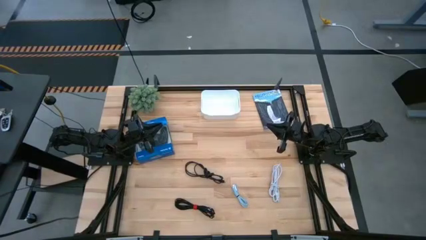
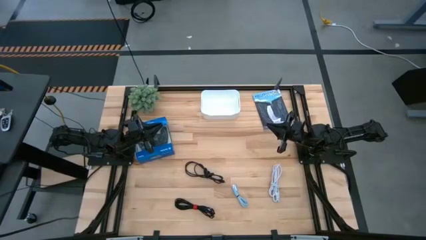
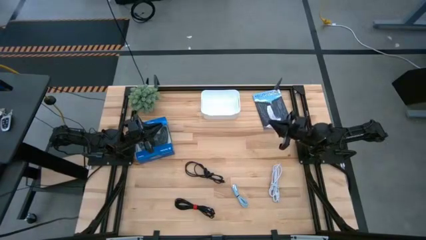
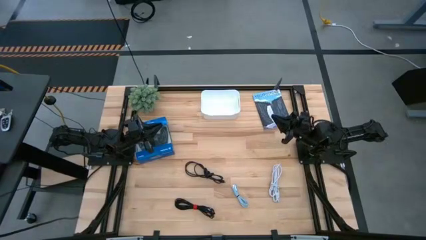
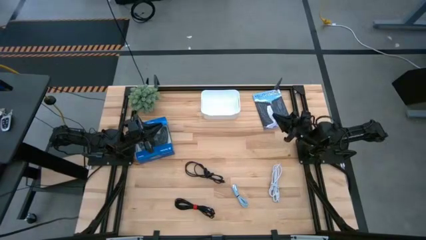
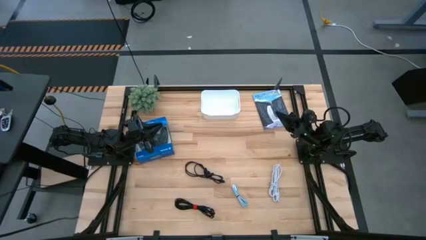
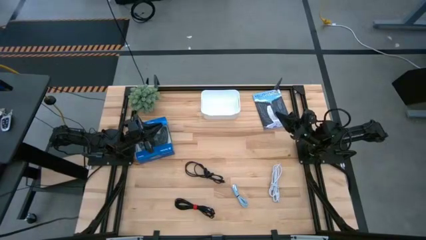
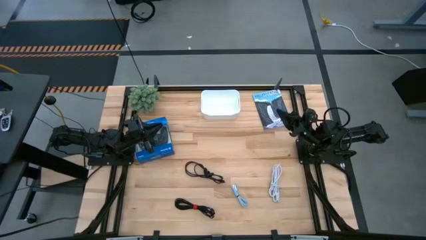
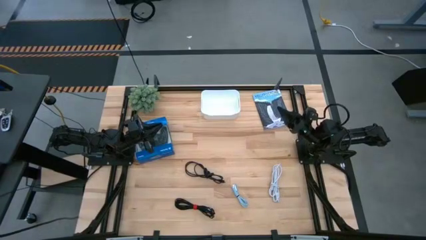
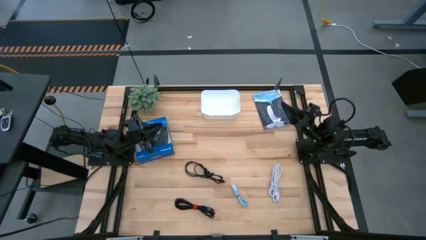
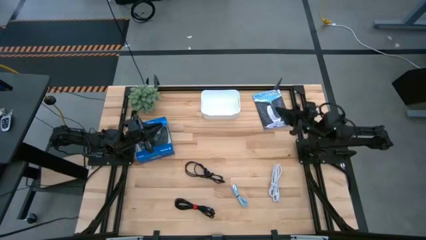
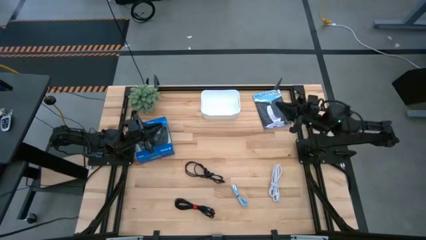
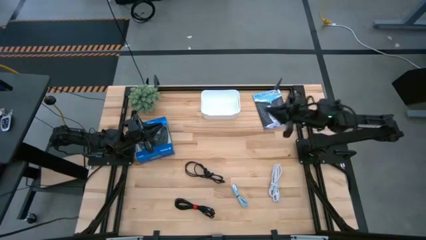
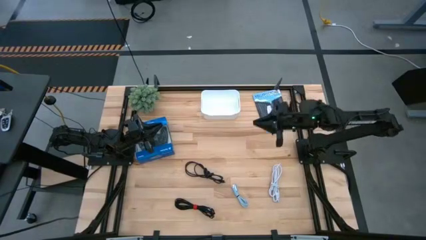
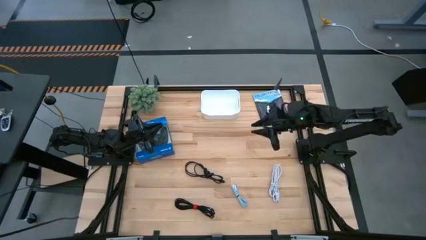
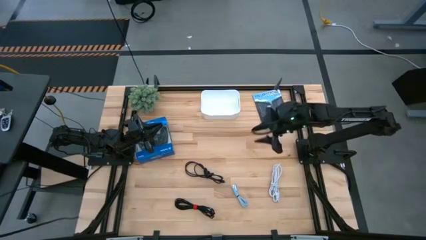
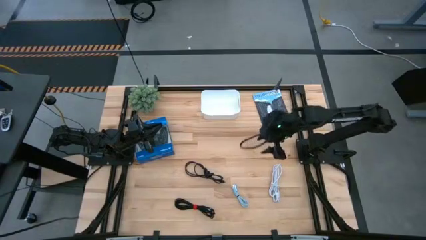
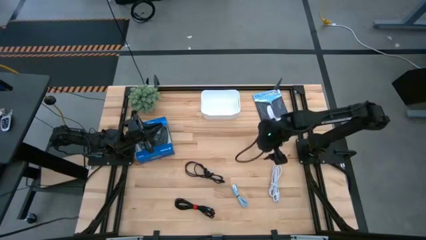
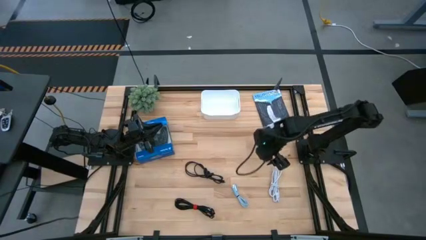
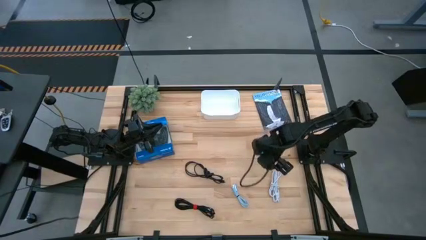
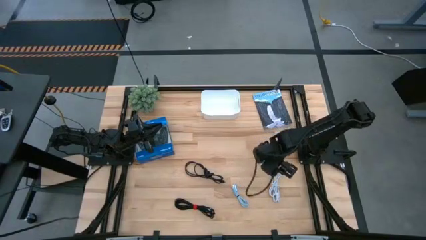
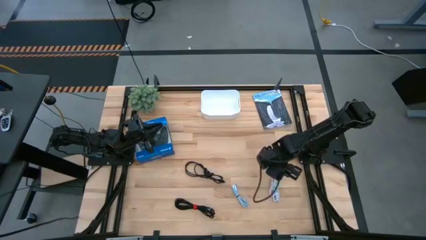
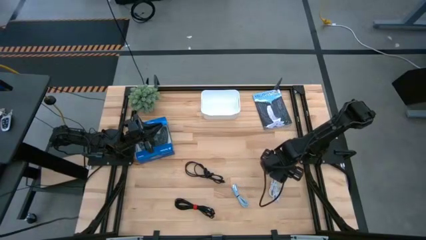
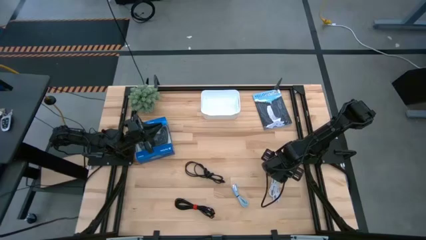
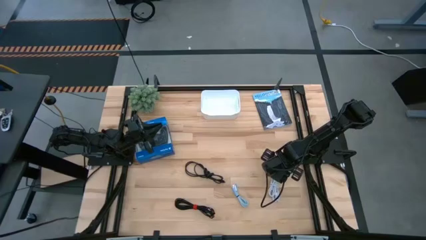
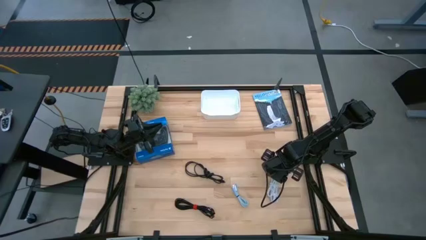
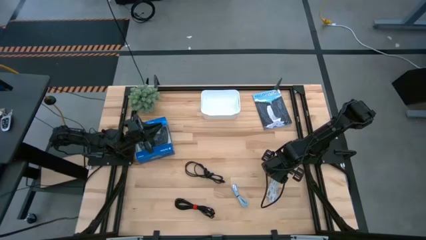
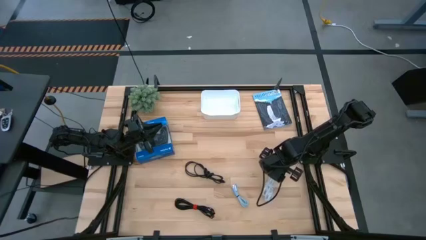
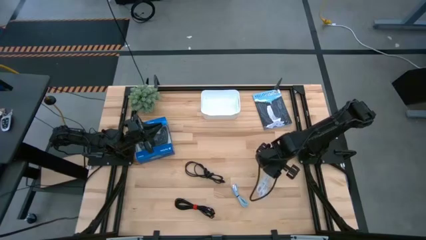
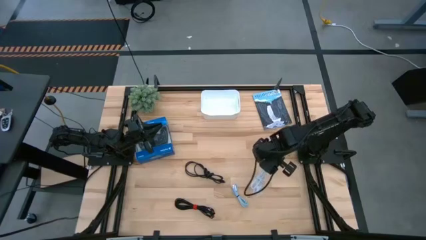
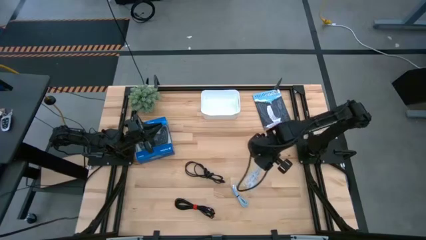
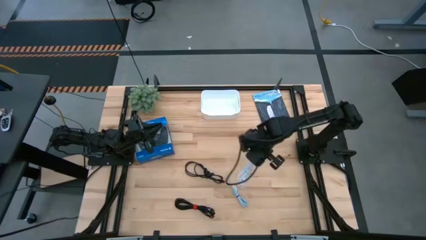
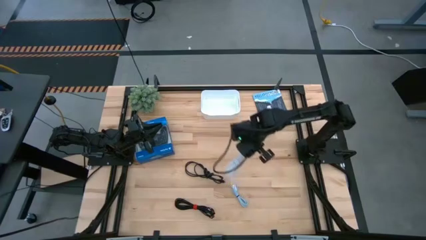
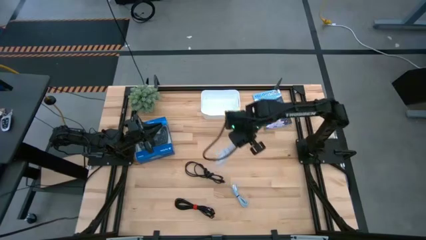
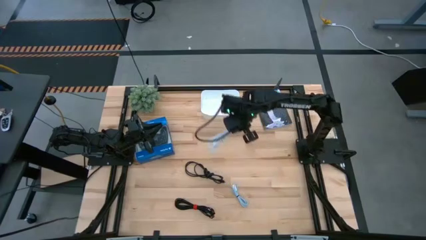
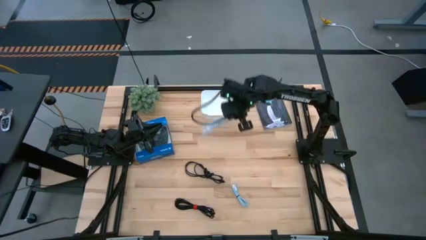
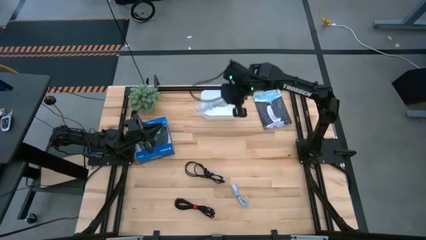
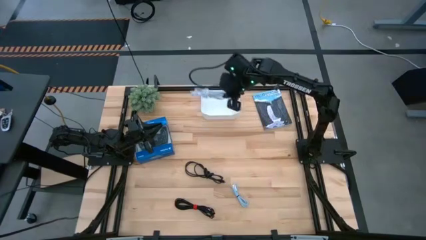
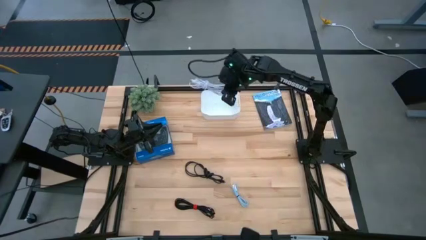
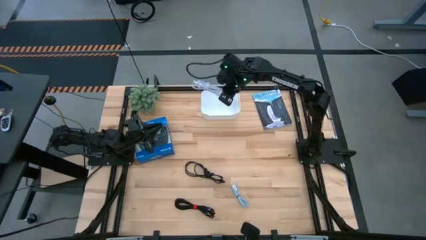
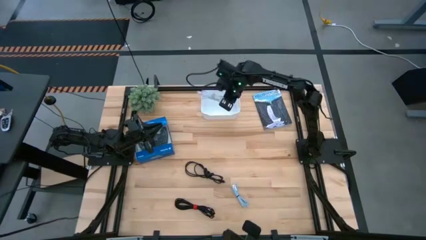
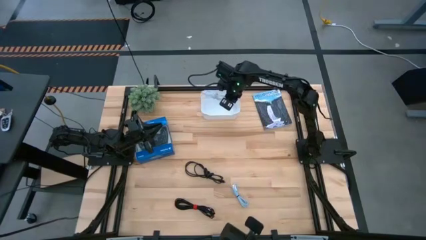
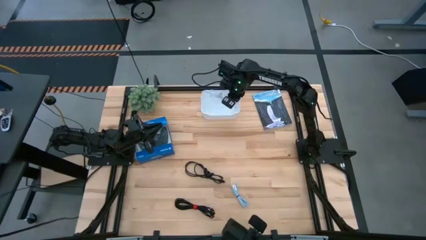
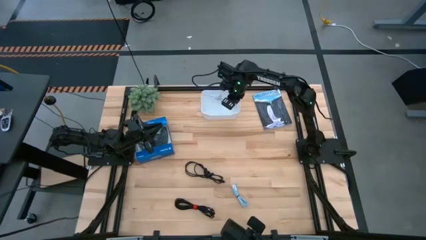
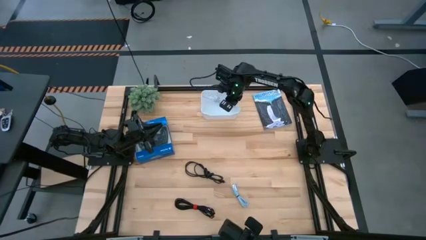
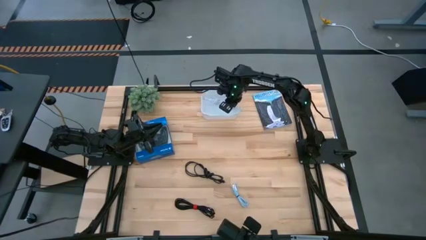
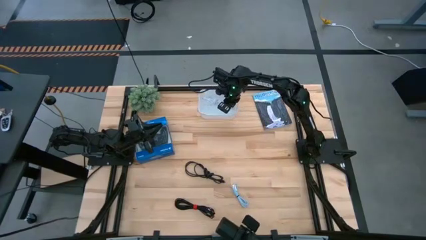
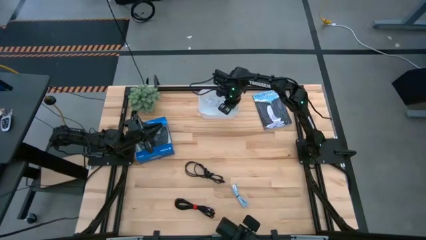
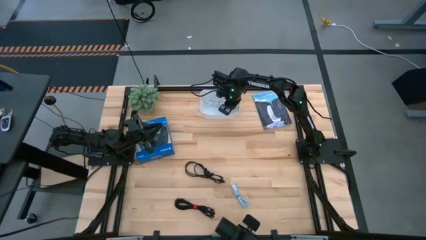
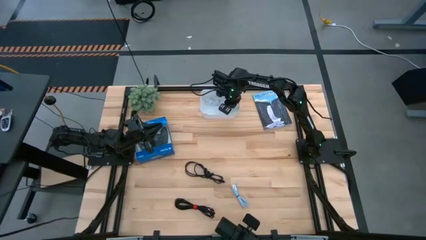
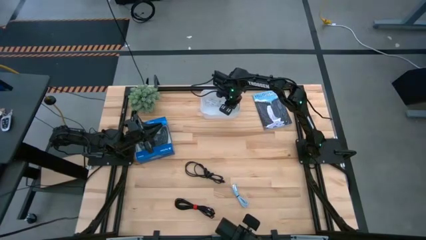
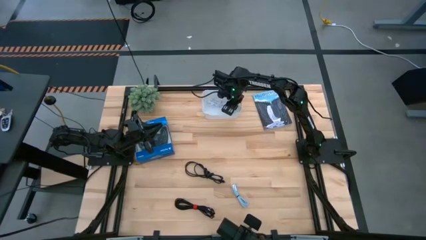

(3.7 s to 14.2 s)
Task: Pick and place USB-C Cables
Put the white USB cable into the white bin

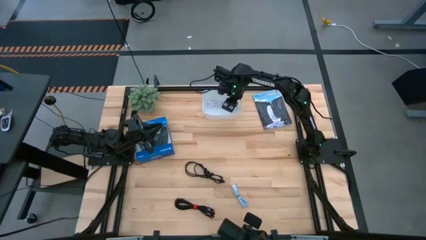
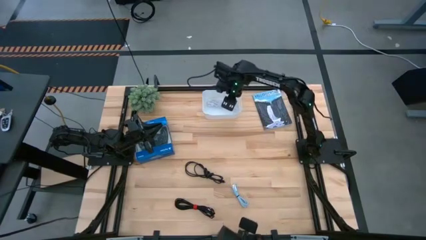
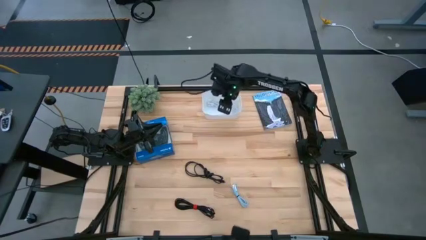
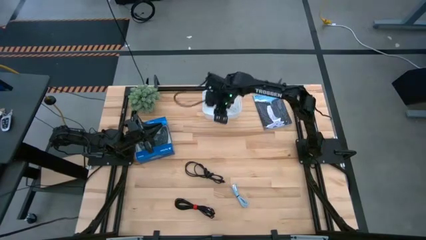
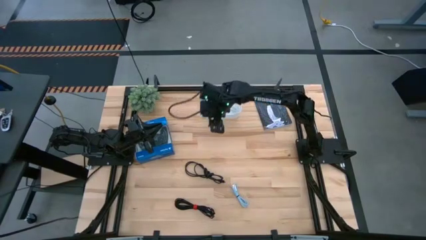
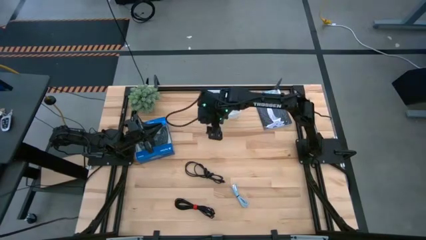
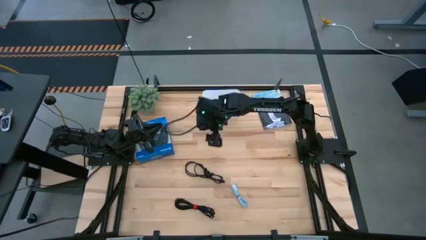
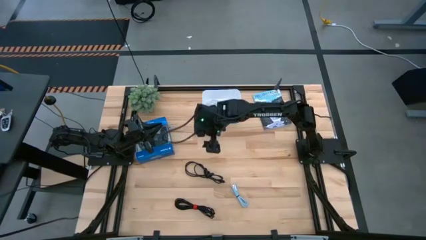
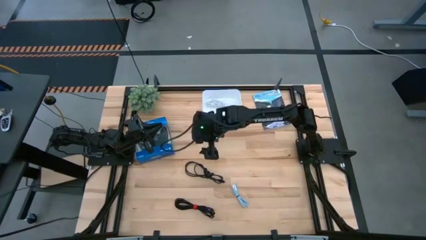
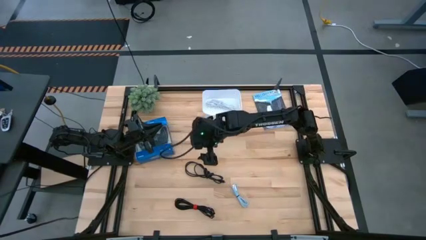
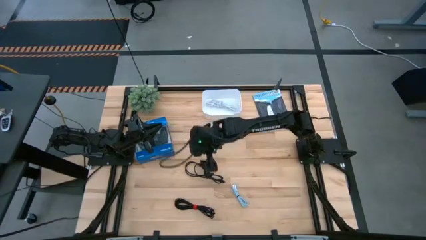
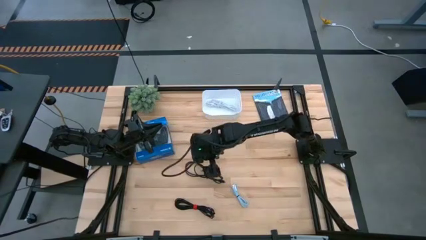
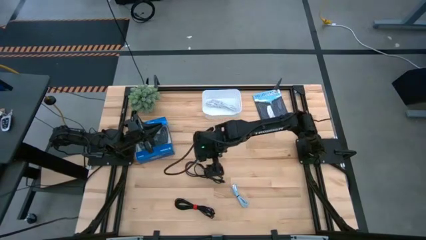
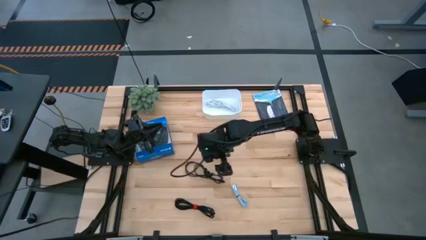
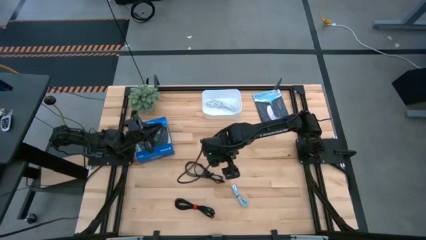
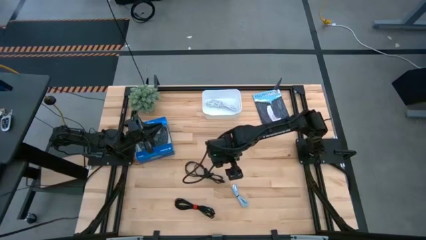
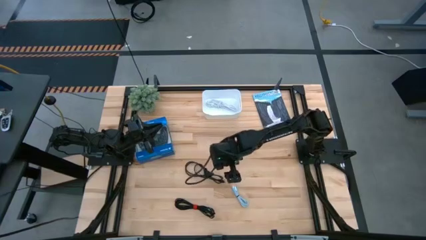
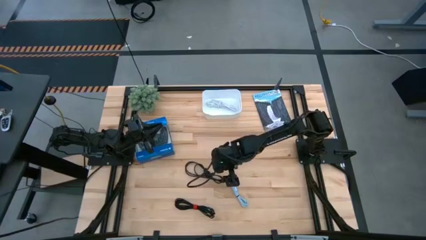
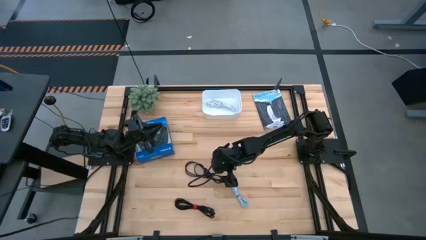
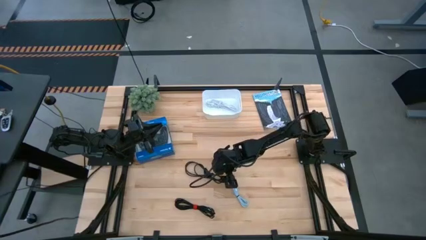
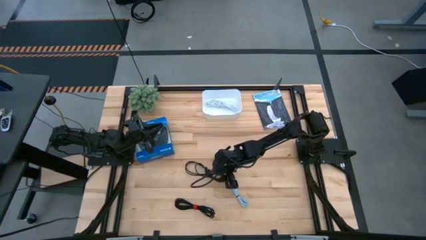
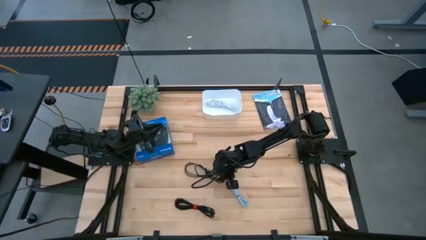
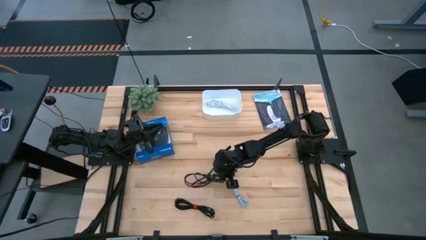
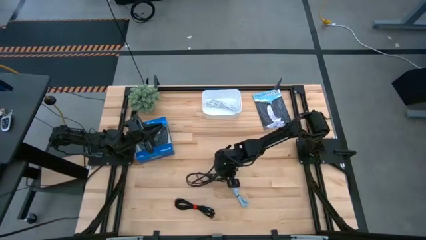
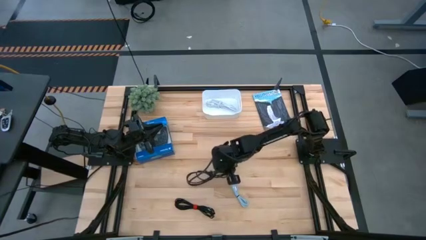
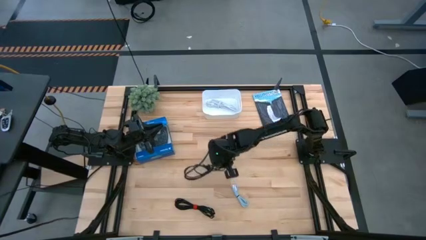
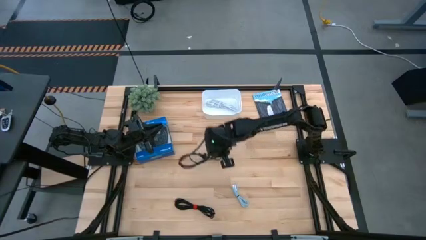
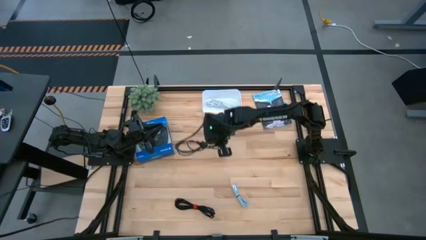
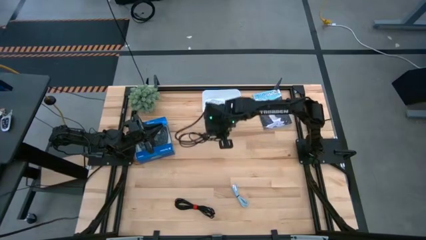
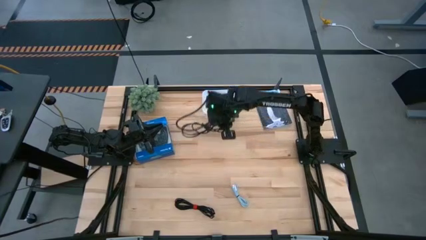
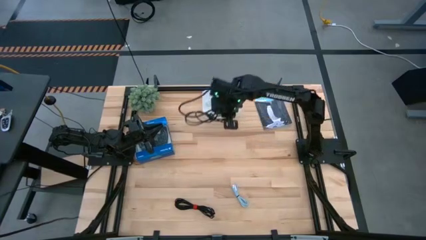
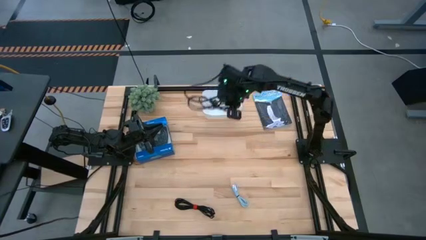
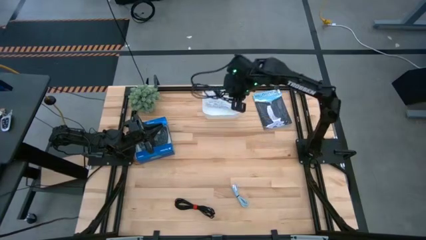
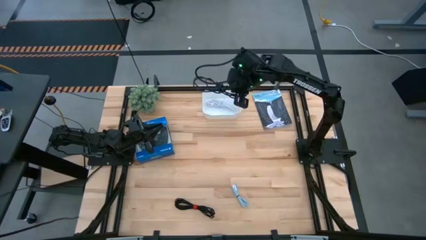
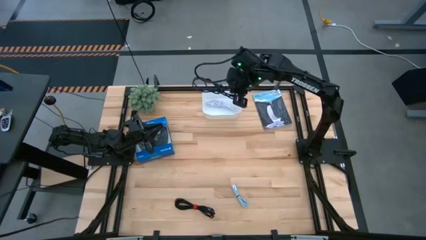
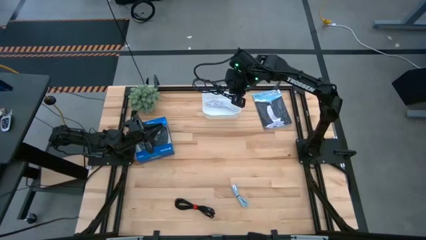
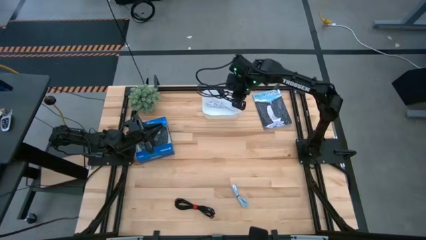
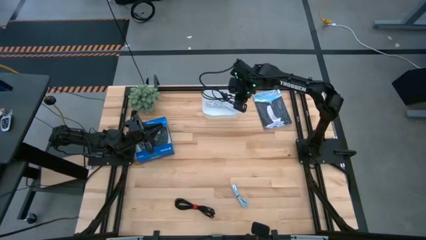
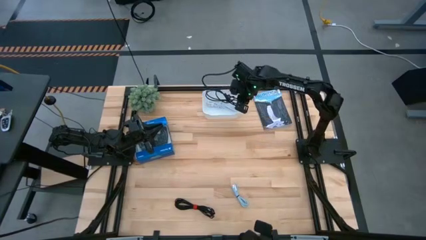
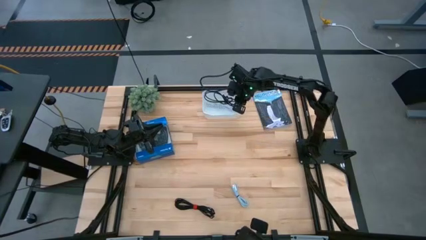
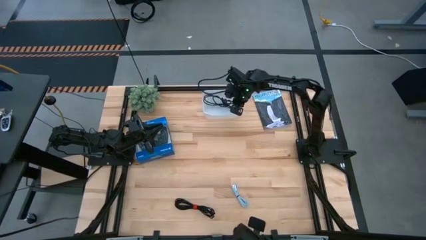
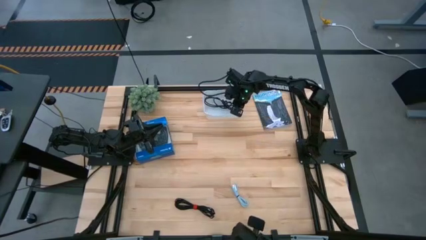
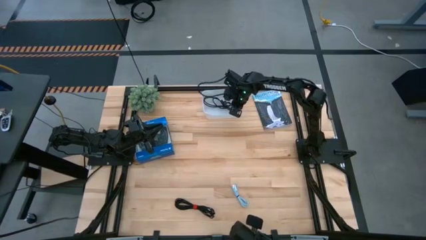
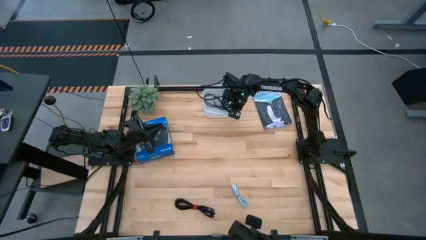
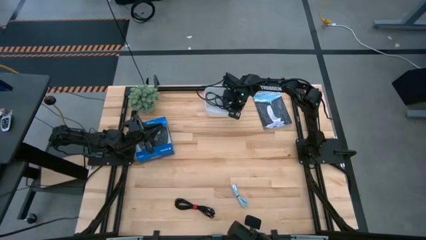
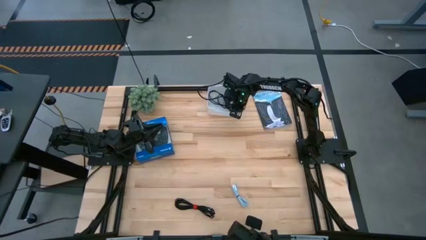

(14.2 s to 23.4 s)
Put the top black USB cable into the white bin
